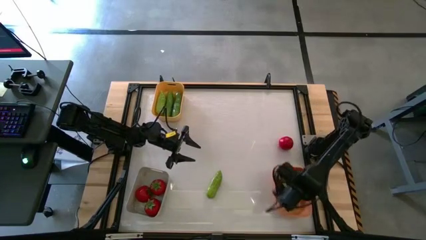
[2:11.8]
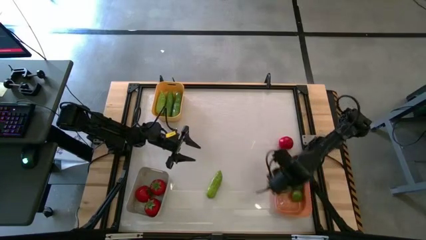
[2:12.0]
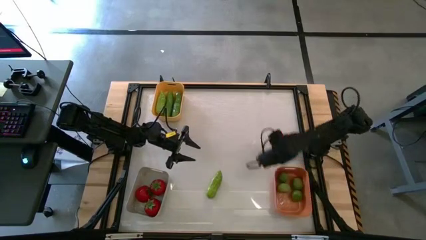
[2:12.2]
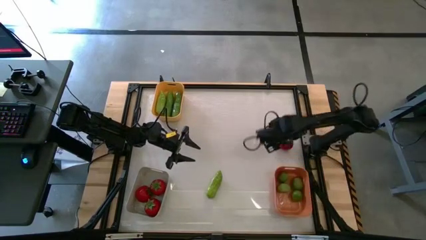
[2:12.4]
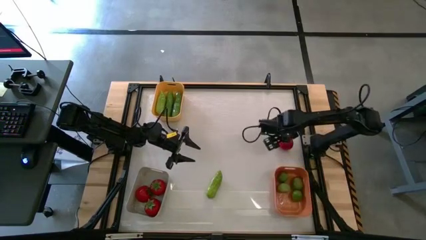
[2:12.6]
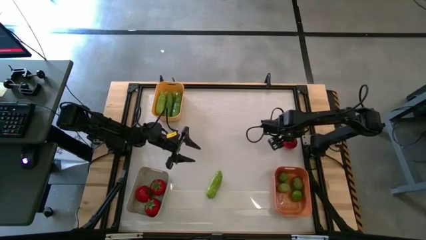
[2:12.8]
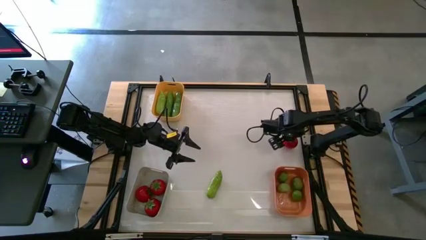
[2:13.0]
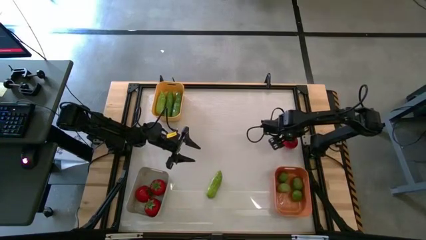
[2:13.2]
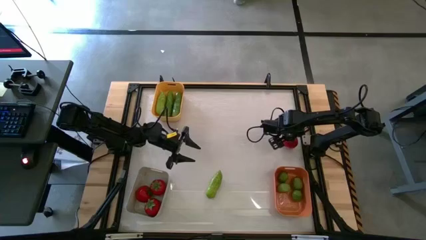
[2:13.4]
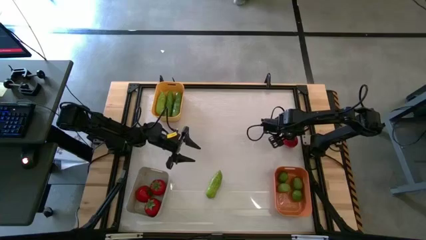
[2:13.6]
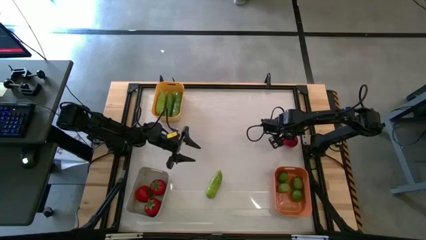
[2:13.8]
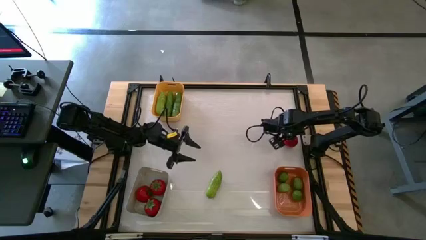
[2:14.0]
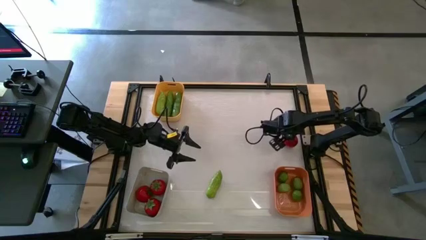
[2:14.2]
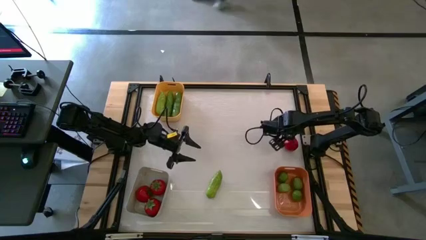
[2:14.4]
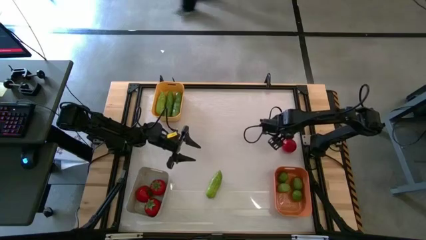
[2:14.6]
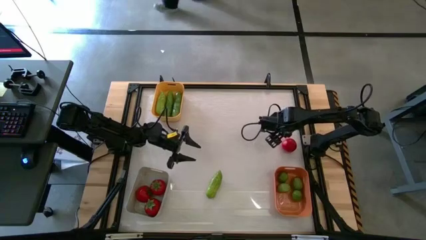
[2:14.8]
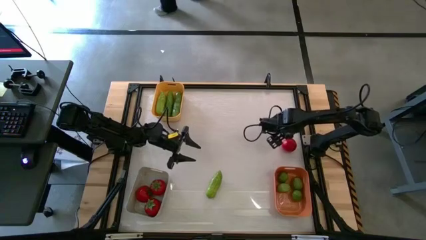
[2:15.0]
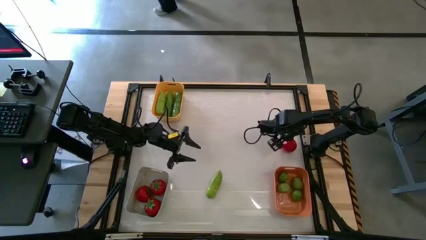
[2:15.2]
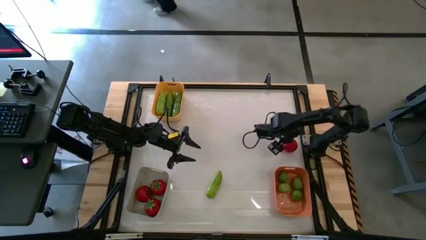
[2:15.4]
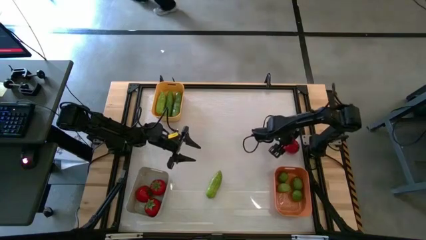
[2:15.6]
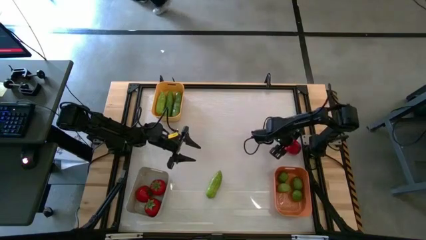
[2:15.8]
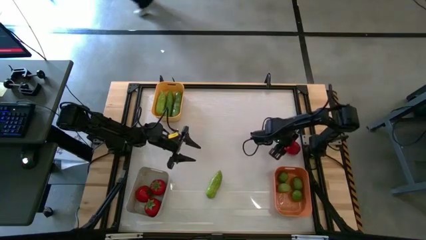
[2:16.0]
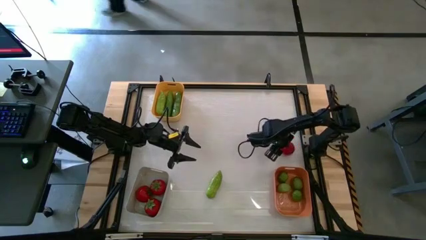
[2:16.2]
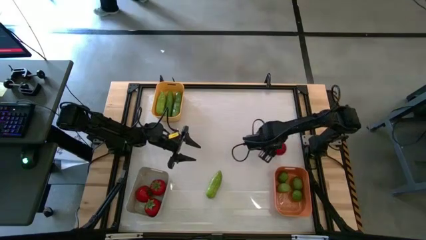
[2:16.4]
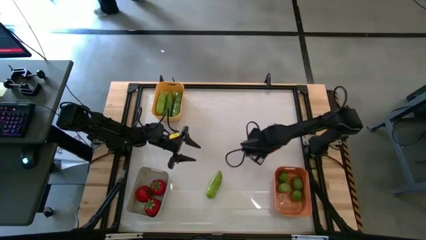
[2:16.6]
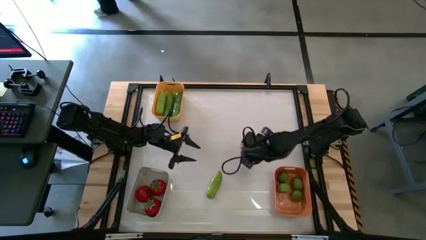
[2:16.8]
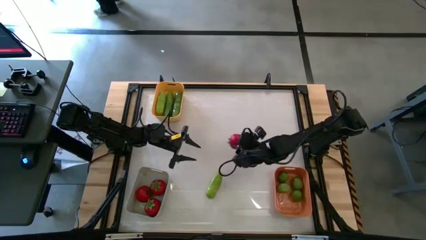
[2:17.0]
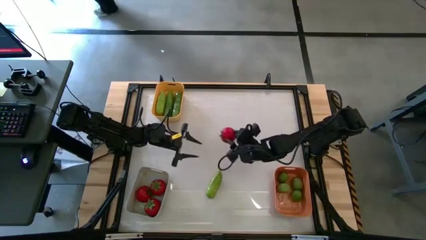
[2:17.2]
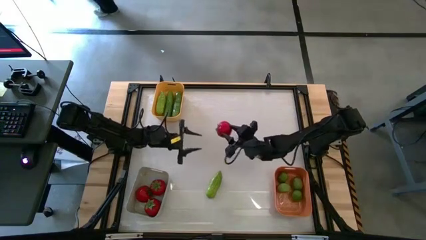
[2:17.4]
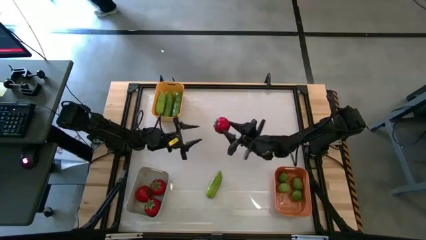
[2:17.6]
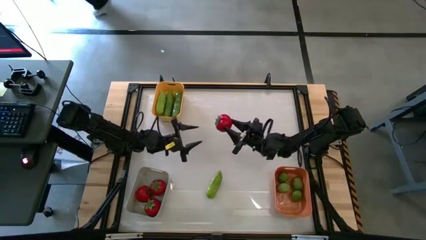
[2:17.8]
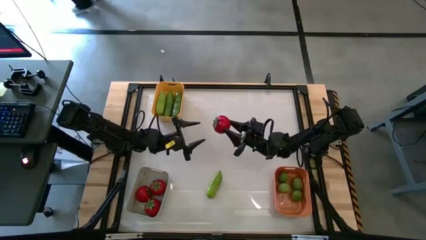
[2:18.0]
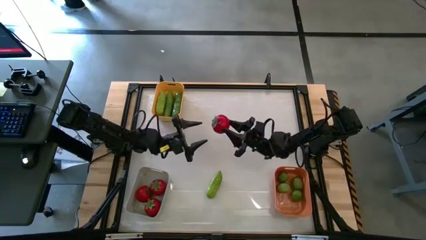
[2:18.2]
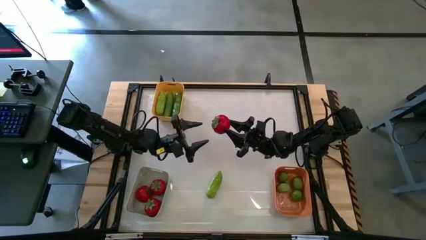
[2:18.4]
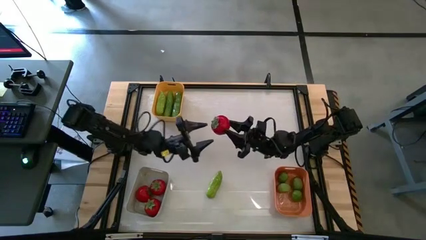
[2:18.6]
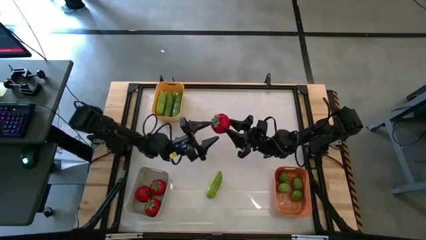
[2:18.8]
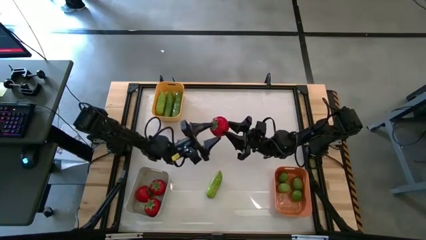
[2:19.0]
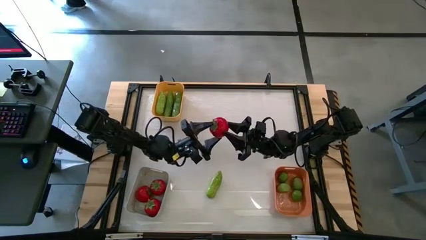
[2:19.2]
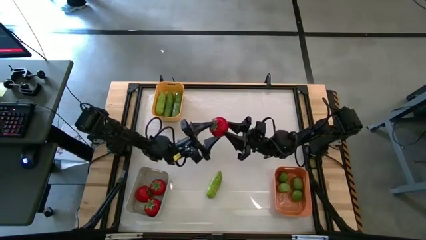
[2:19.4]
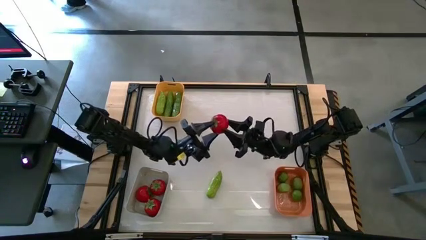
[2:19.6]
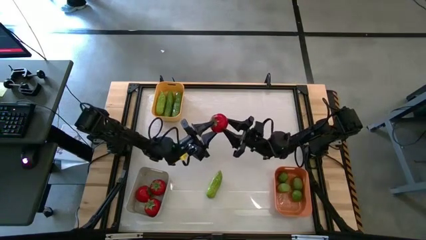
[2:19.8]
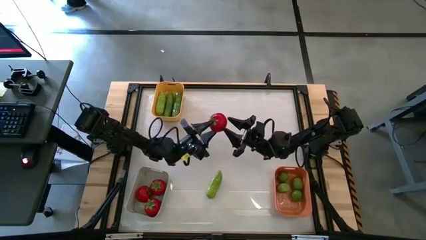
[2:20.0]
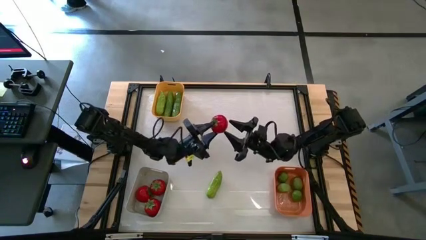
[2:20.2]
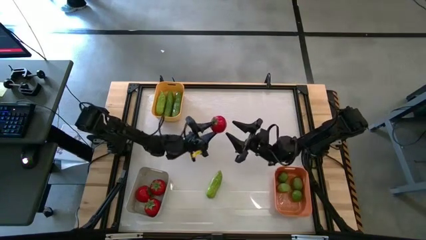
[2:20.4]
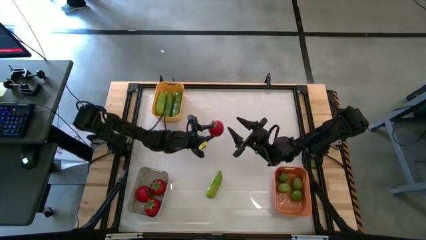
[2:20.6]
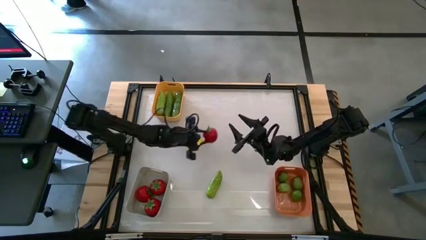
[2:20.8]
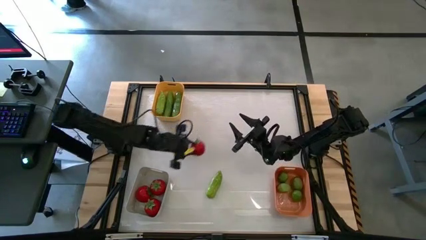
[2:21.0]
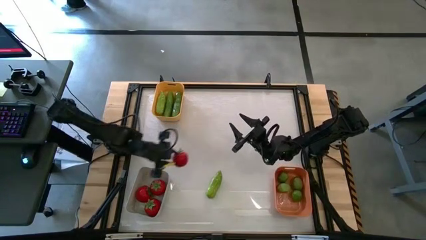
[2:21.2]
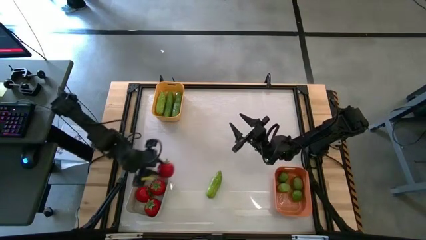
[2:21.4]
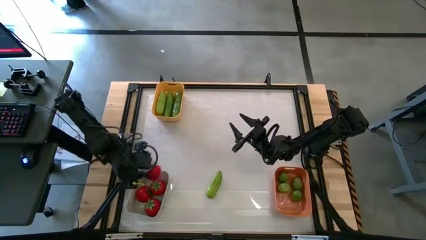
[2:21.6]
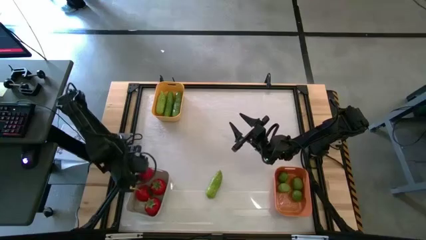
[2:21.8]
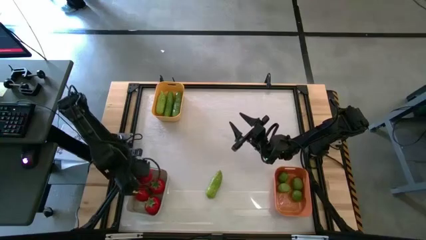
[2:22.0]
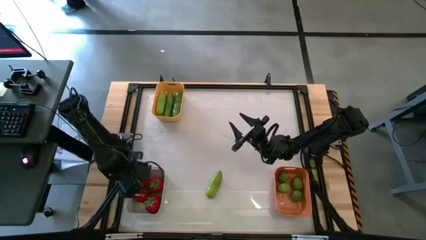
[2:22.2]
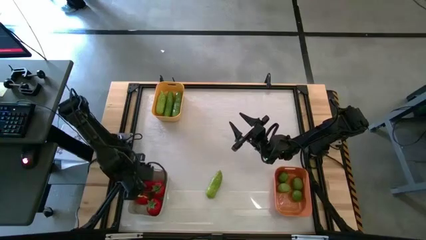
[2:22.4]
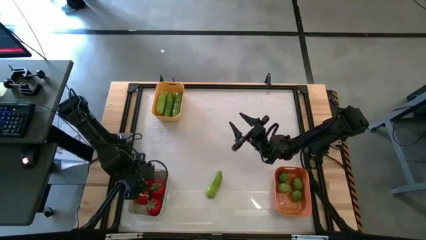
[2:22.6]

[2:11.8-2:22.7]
Task: Sort produce into baskets
Put the red tomato into the gray bin

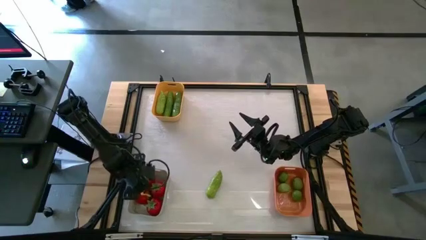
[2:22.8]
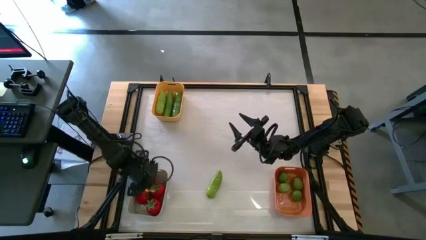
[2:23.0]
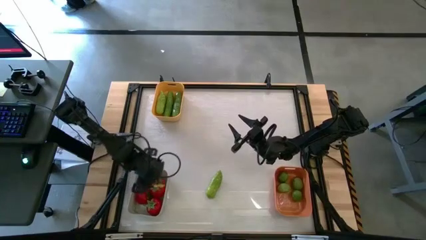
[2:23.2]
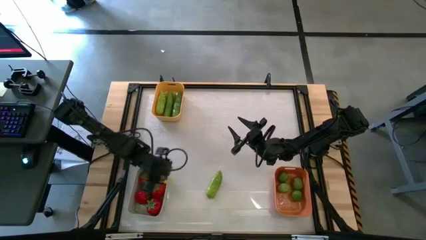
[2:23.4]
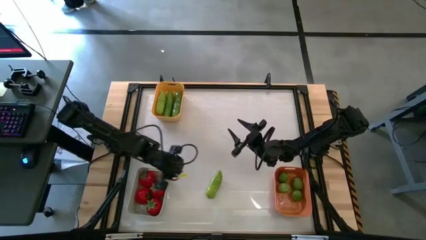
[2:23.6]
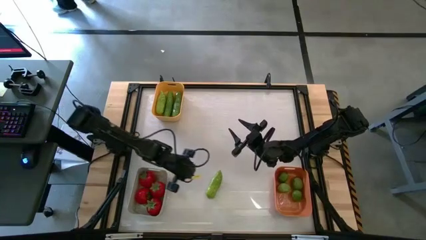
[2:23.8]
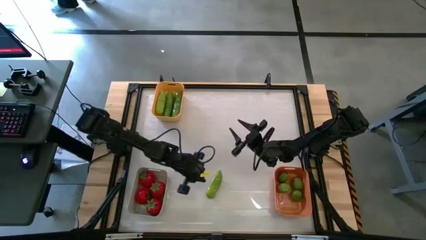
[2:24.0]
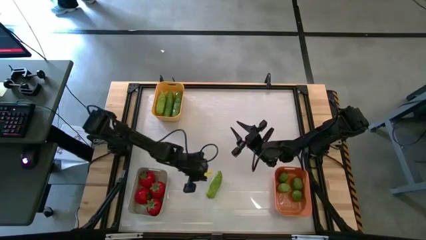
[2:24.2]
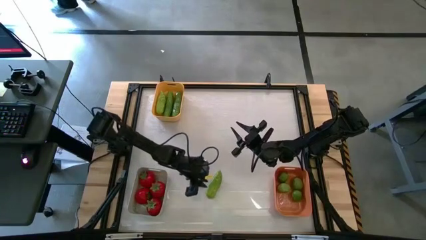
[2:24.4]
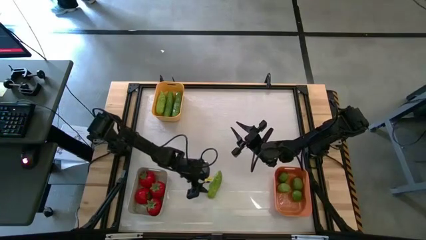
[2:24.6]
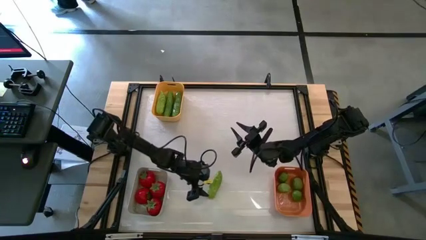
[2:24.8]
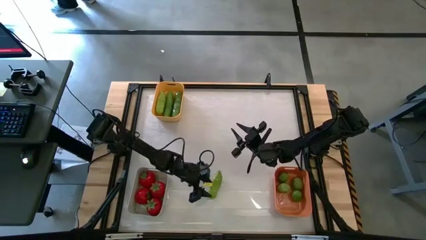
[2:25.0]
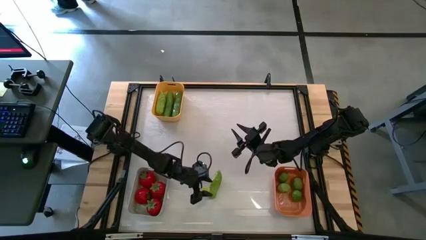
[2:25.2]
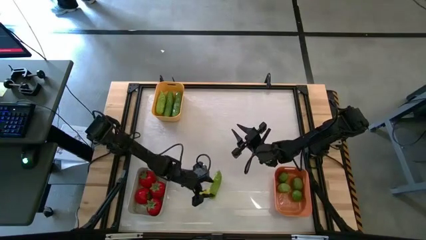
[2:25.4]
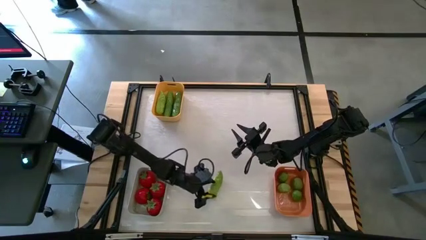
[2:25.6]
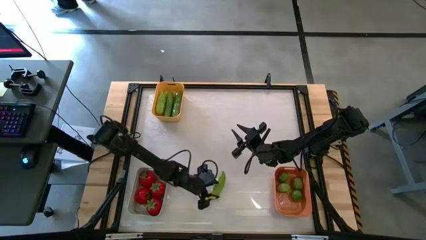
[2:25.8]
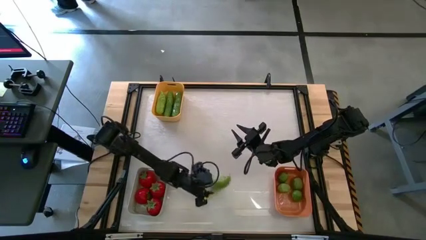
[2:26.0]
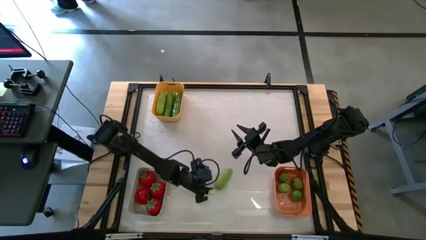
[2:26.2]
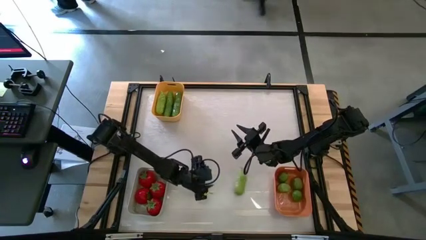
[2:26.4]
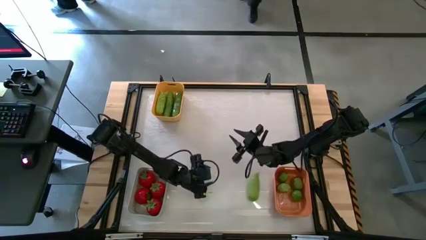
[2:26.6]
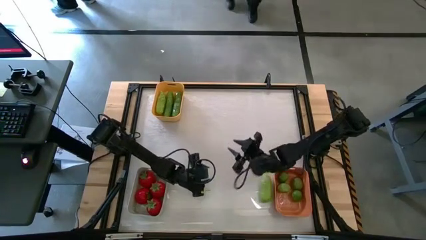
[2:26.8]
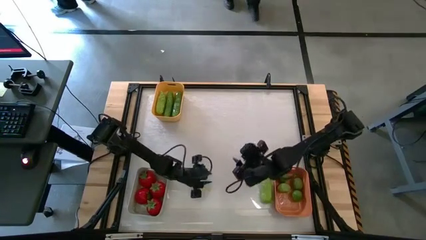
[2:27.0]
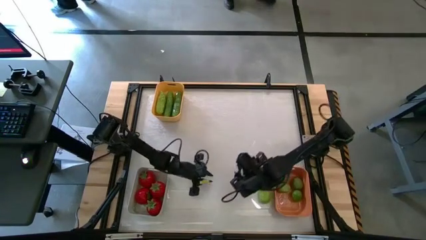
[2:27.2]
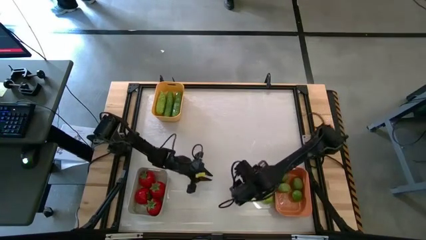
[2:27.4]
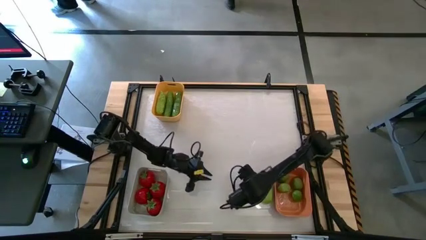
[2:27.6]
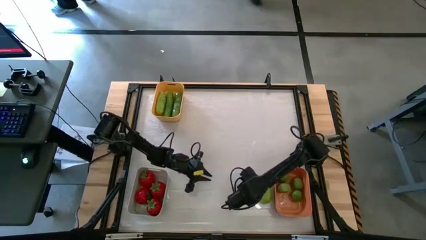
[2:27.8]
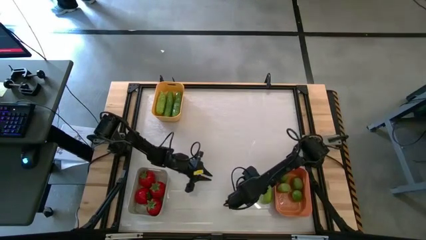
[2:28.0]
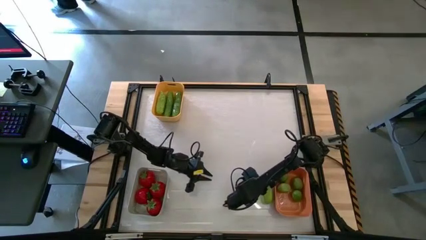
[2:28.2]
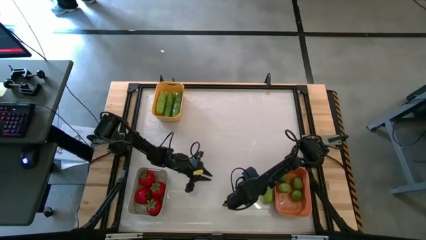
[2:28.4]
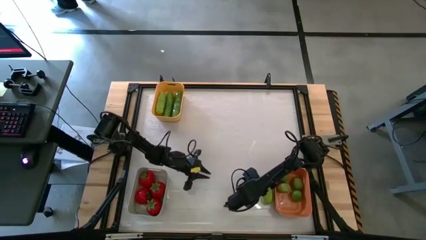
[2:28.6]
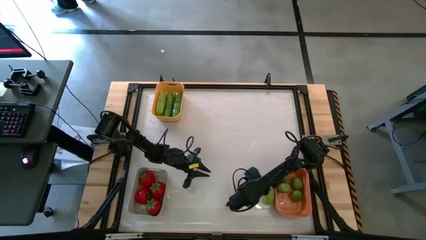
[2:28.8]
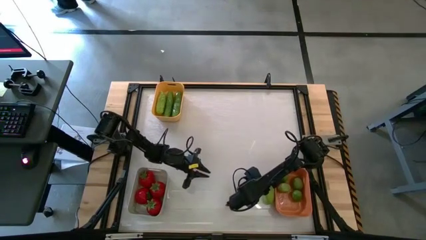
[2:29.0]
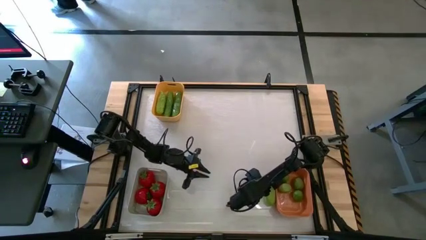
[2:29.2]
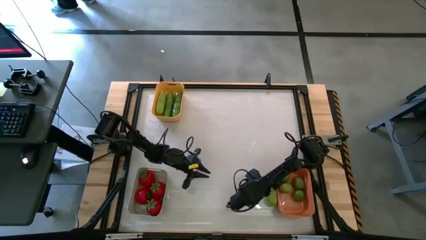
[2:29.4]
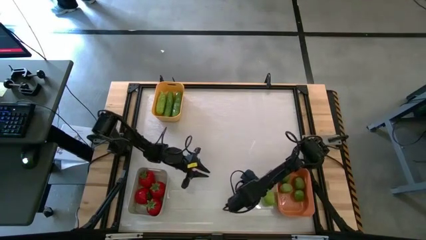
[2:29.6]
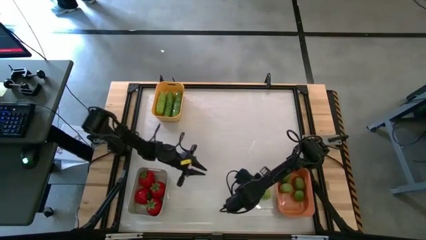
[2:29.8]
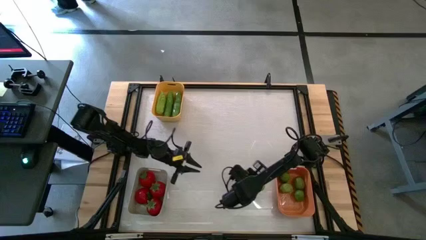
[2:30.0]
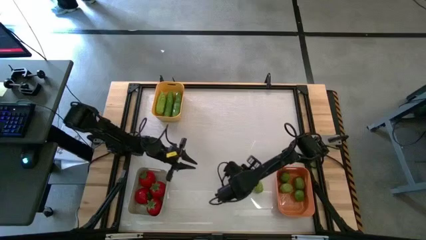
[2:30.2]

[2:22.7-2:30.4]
Put the green cucumber into the yellow bin
